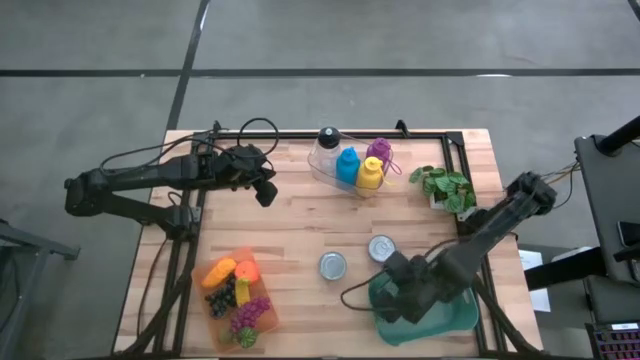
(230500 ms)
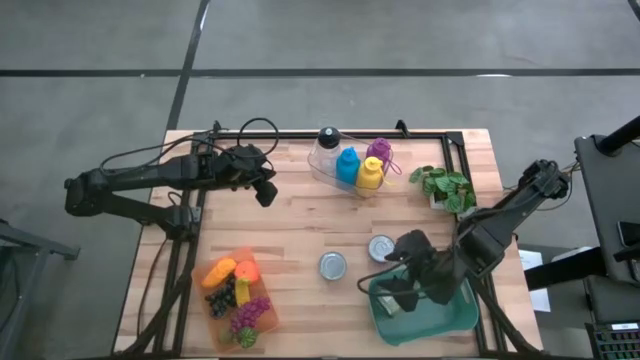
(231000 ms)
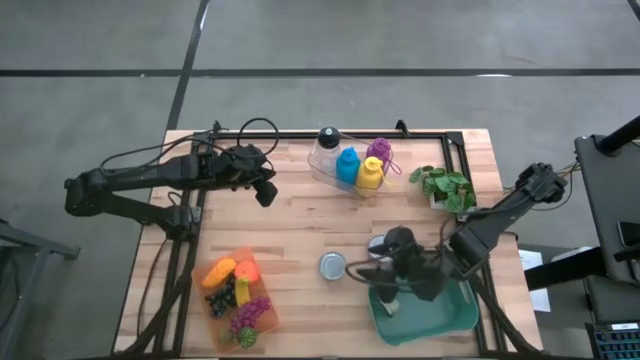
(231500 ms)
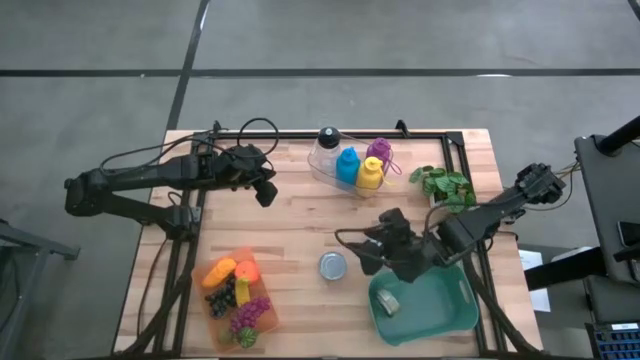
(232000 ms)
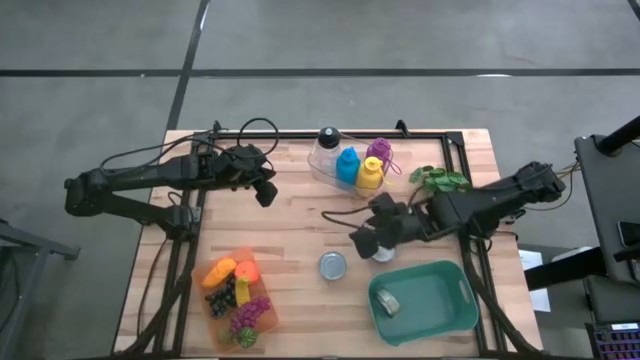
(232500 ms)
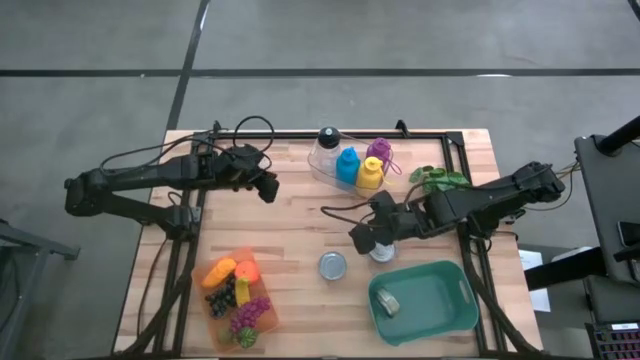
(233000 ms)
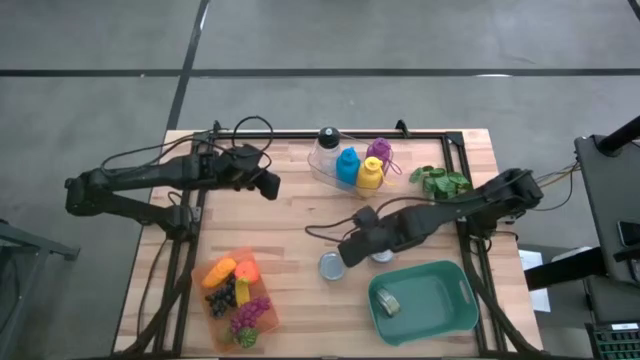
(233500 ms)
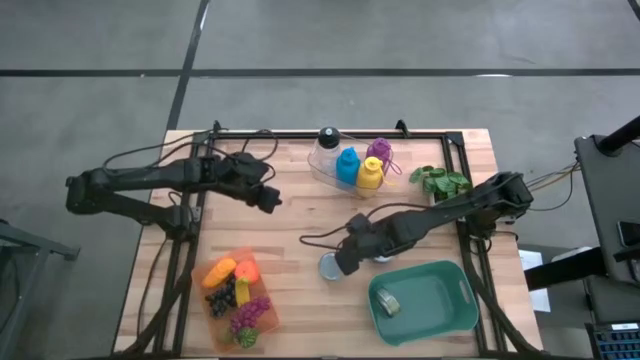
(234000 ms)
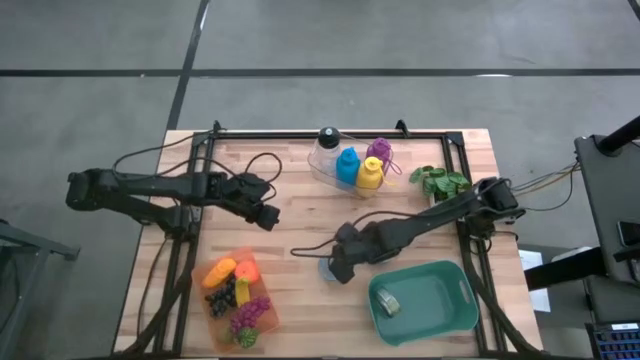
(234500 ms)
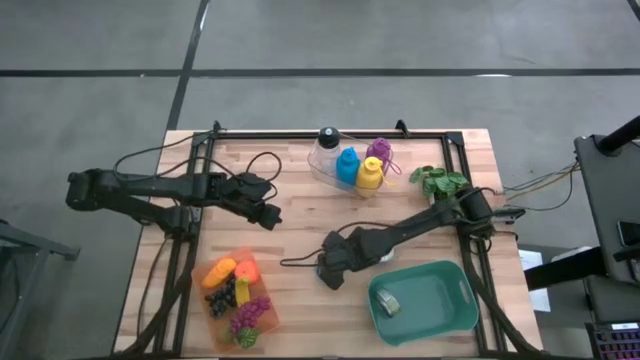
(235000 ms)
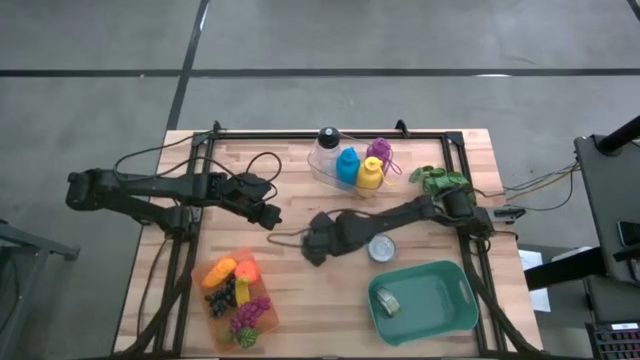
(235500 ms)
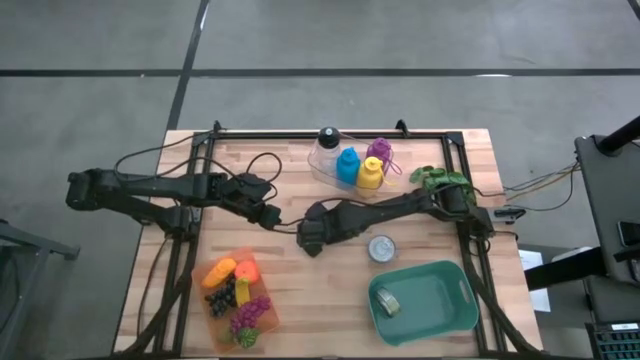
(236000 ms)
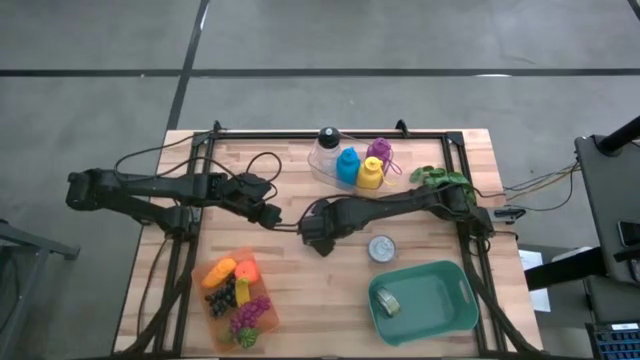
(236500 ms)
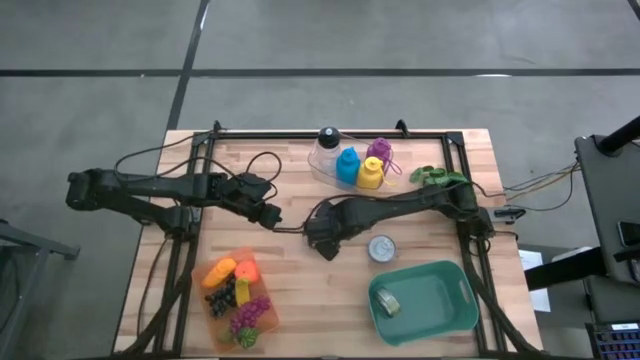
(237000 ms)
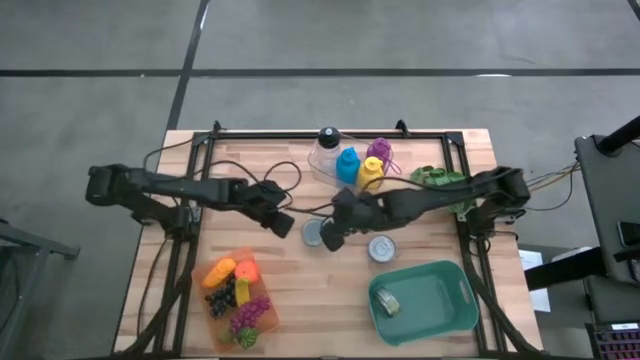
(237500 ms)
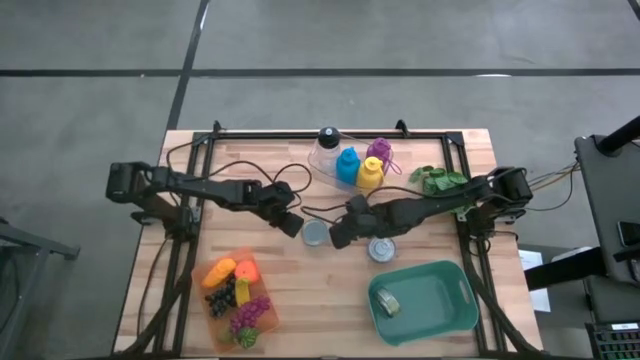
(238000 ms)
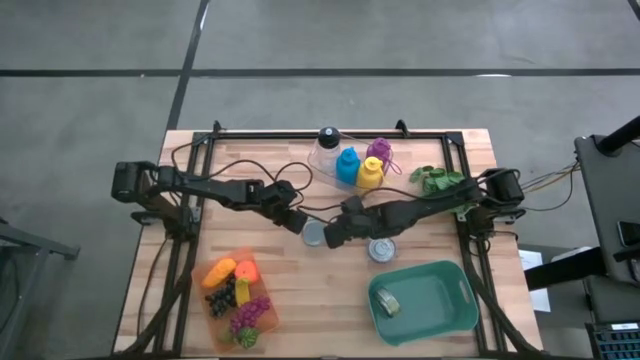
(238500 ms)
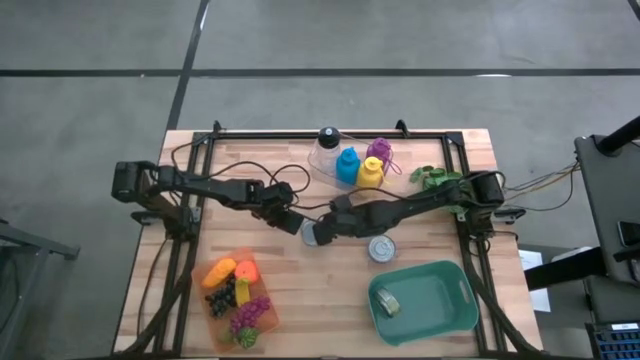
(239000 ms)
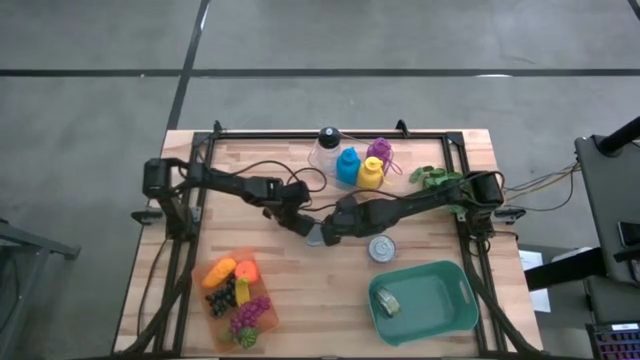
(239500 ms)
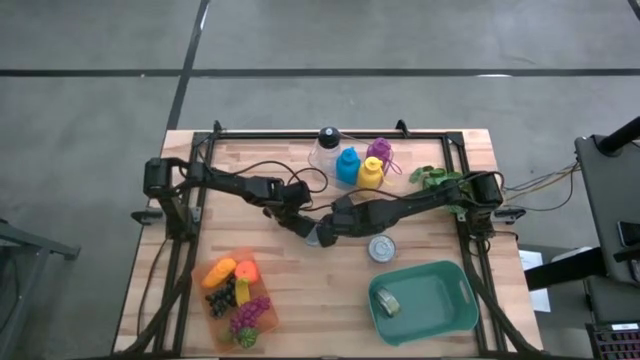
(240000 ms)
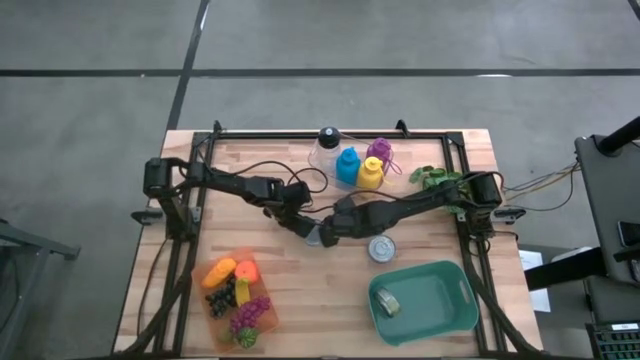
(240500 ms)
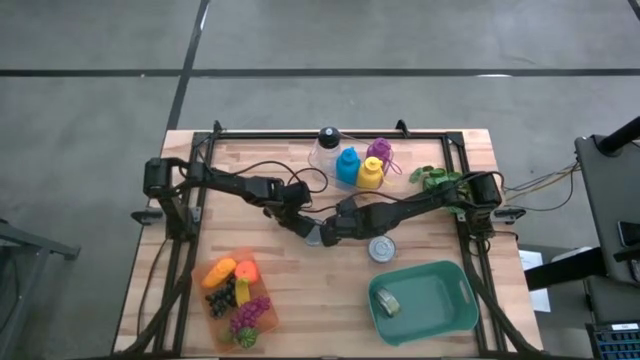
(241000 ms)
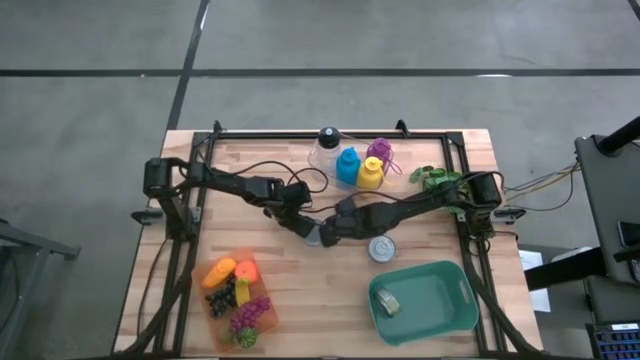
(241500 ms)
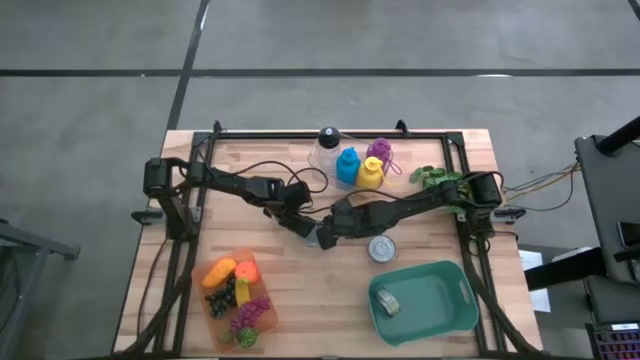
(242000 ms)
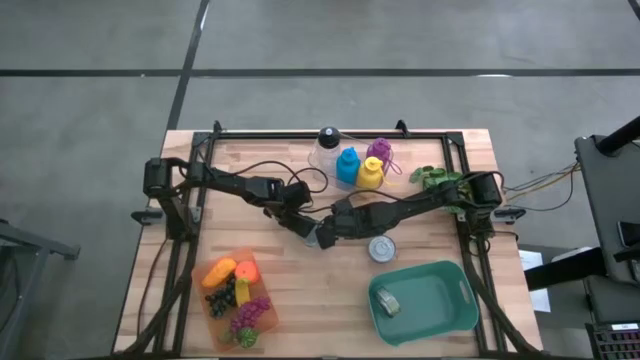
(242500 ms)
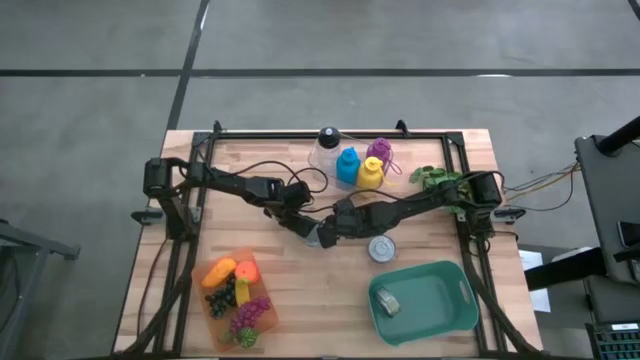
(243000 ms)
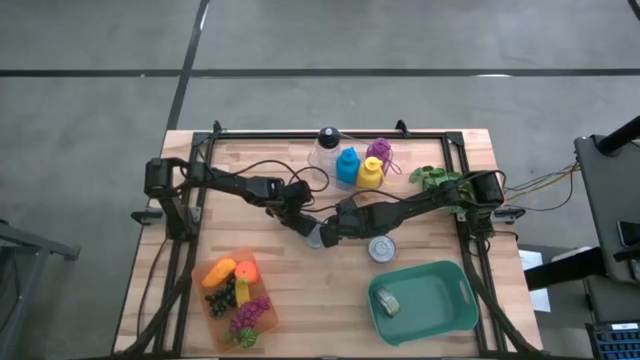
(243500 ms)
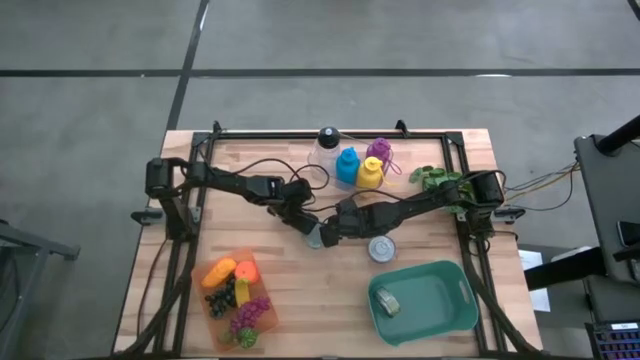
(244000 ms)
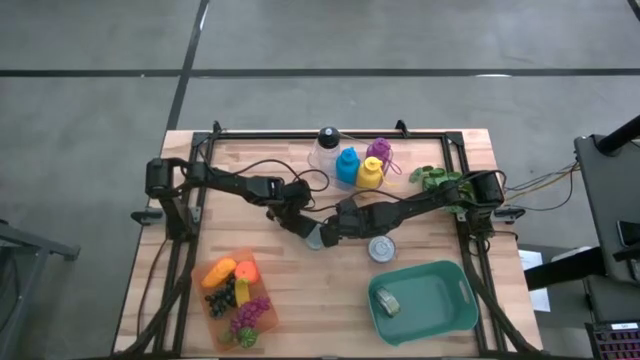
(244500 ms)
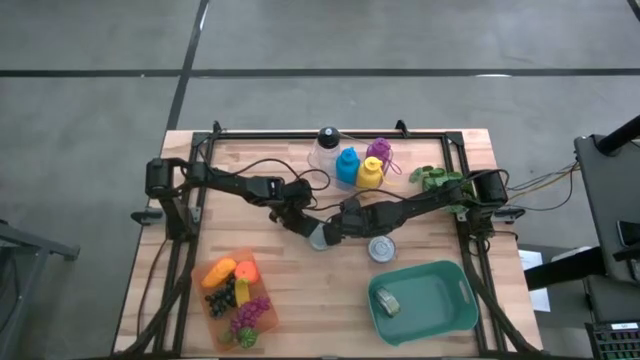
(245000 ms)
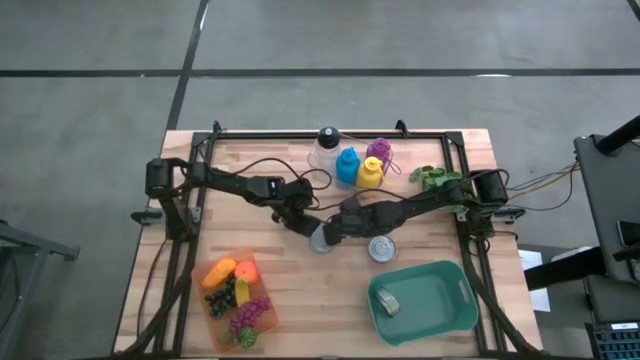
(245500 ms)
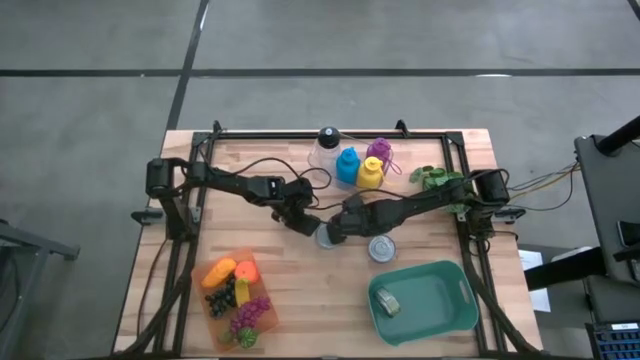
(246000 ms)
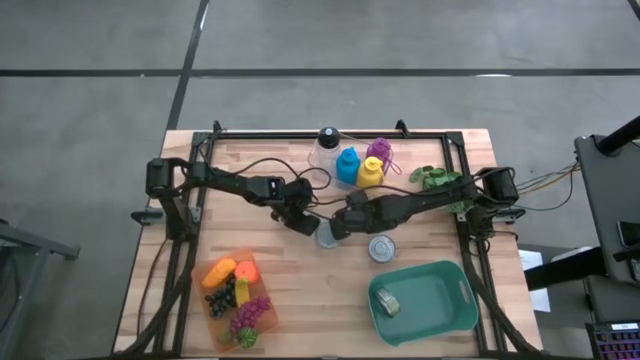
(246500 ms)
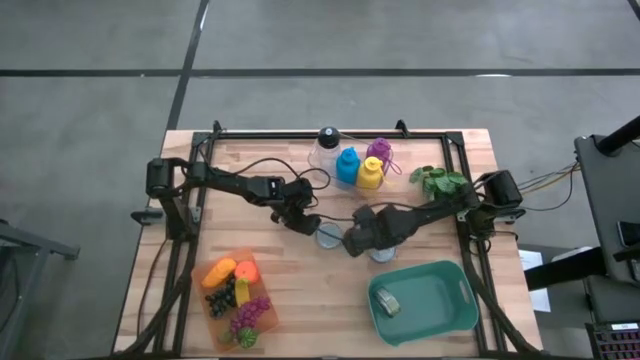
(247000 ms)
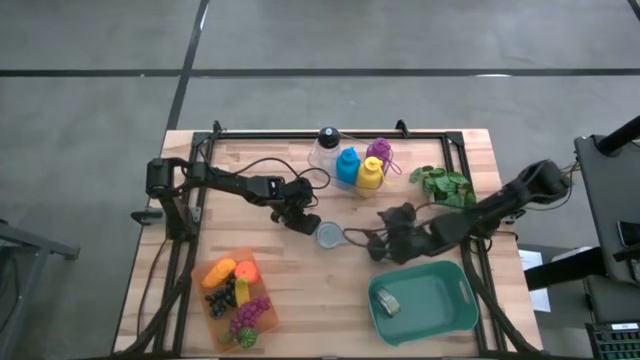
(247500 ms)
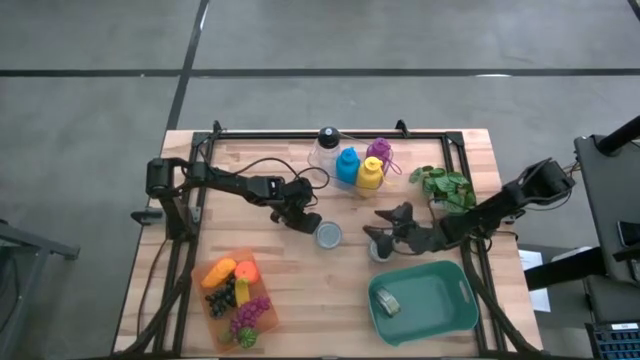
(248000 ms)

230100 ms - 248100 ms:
Task: Pick & Place Food Item
Put the green tuna can into the green bin

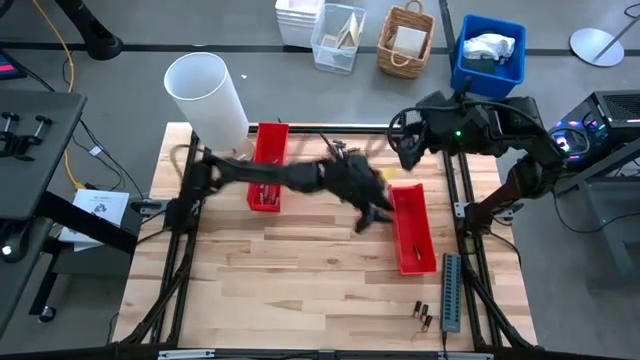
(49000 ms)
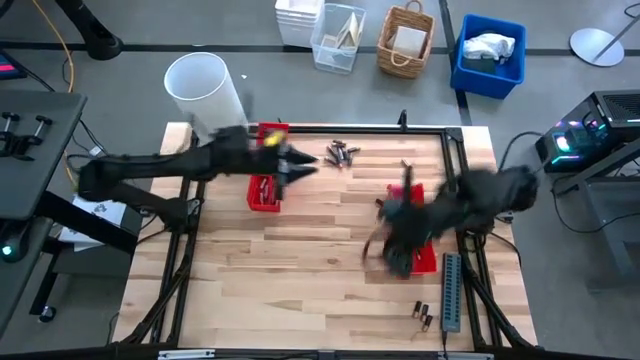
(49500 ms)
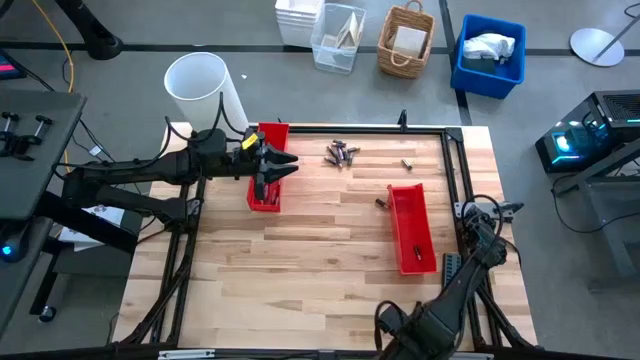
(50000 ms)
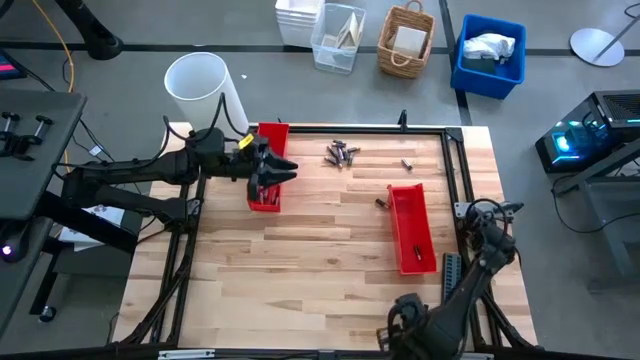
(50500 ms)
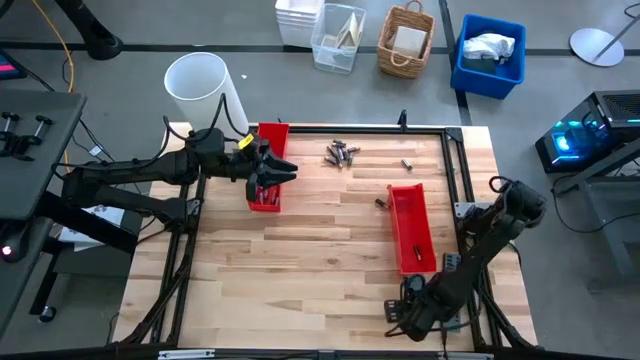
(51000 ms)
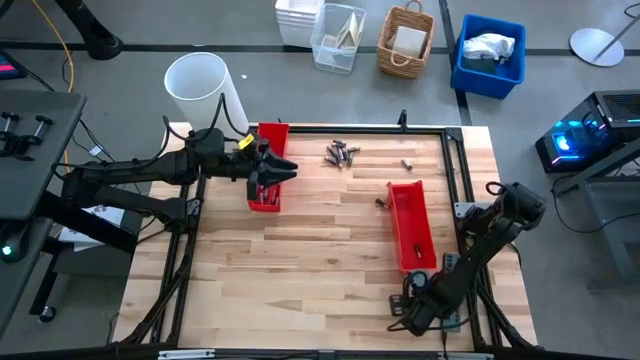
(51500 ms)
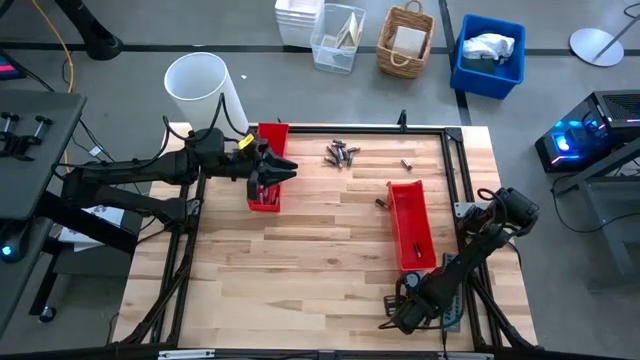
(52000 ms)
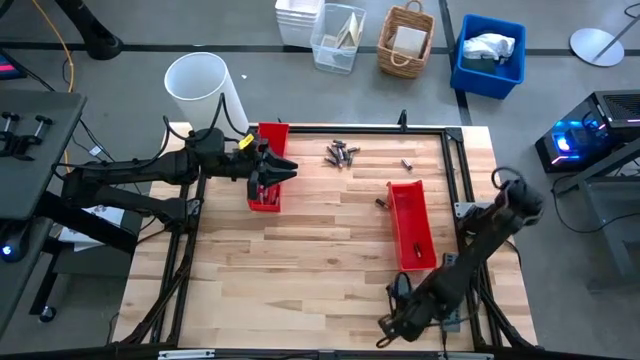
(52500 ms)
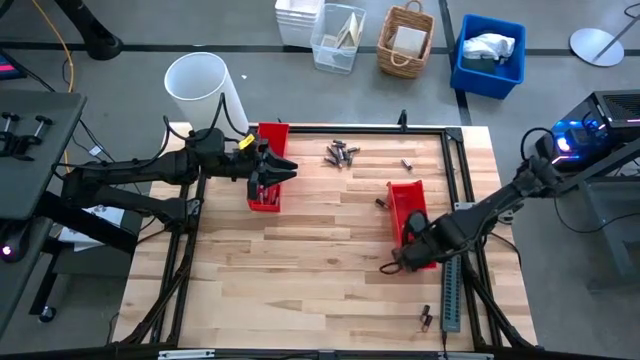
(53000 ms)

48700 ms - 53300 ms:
Task: Sort batteries
Put the black battery into the bottom red bin
